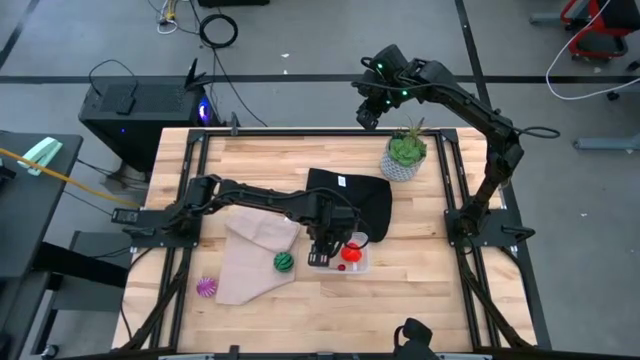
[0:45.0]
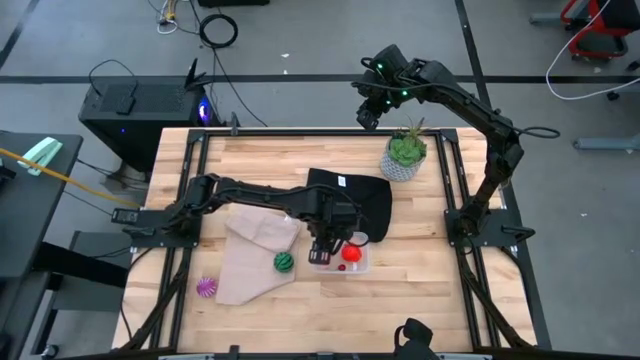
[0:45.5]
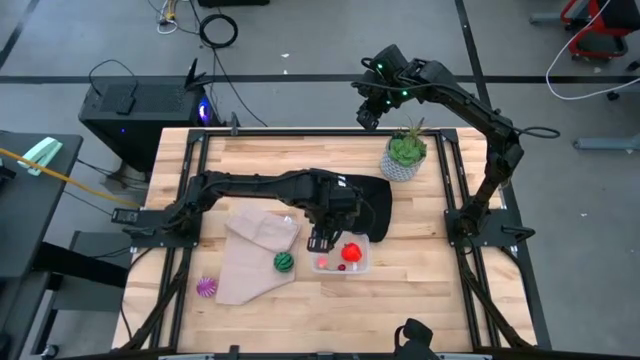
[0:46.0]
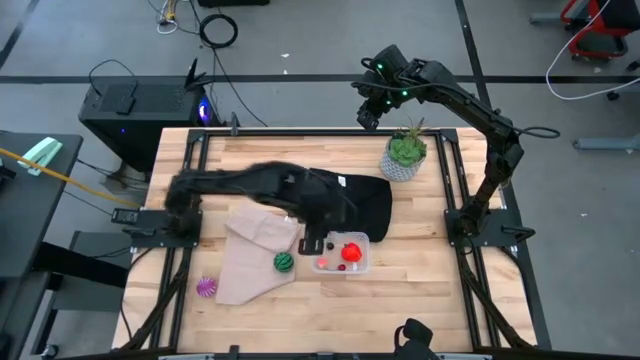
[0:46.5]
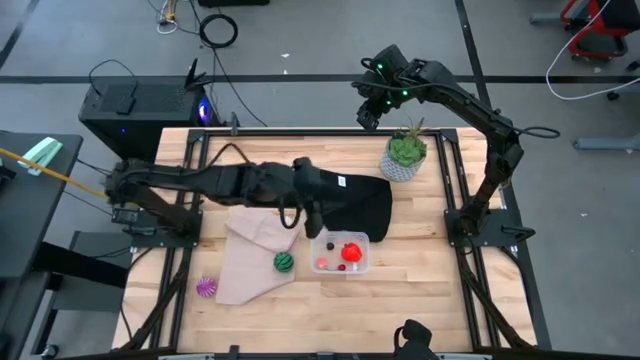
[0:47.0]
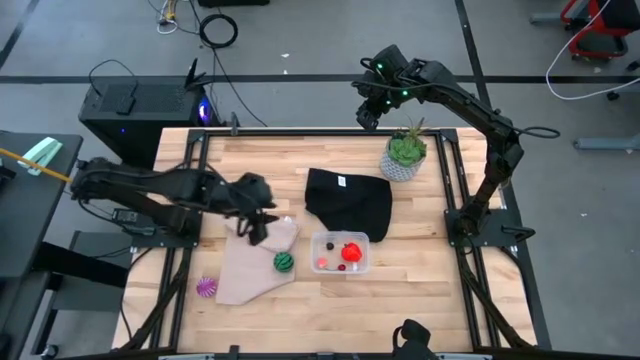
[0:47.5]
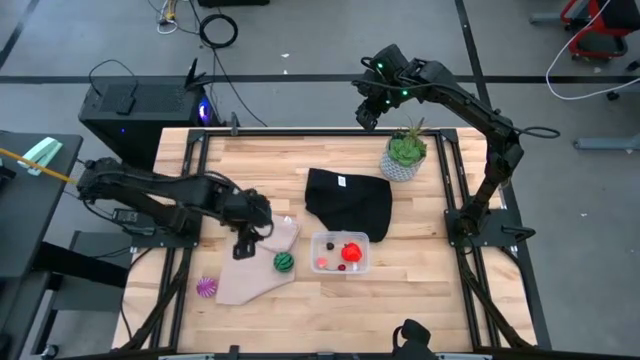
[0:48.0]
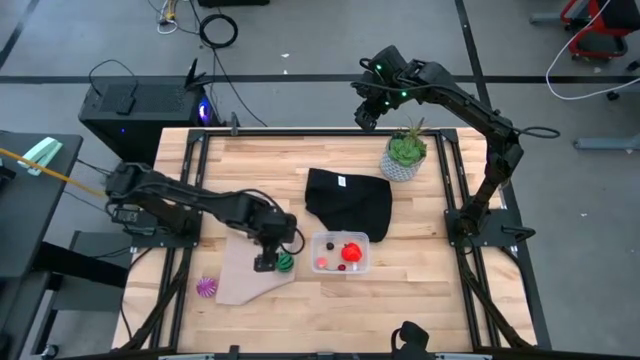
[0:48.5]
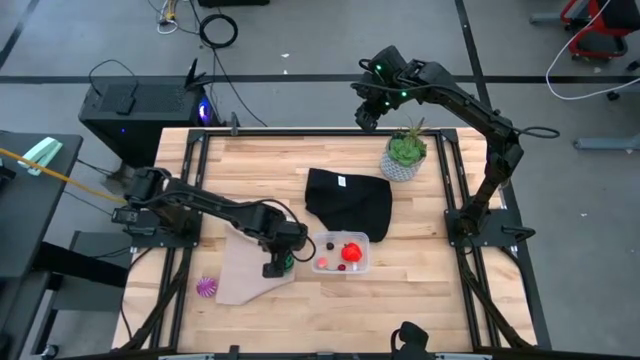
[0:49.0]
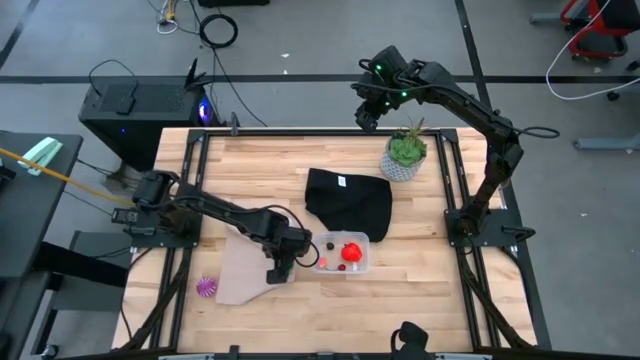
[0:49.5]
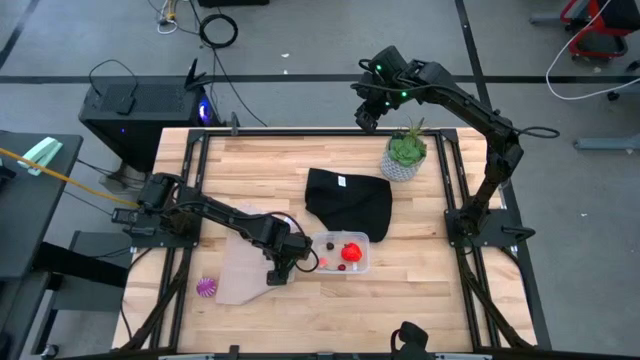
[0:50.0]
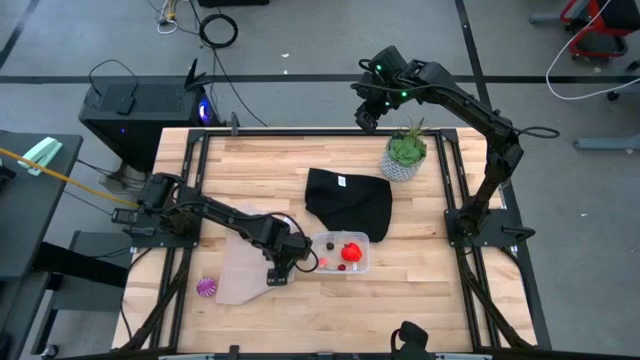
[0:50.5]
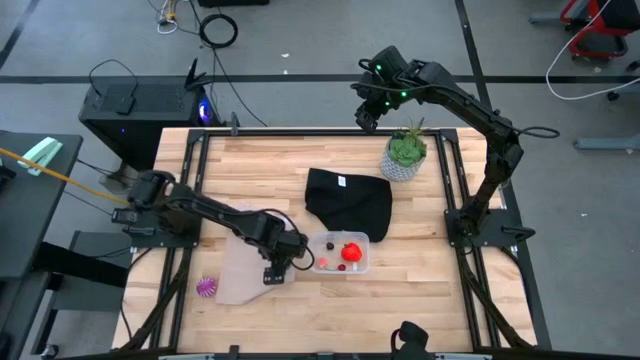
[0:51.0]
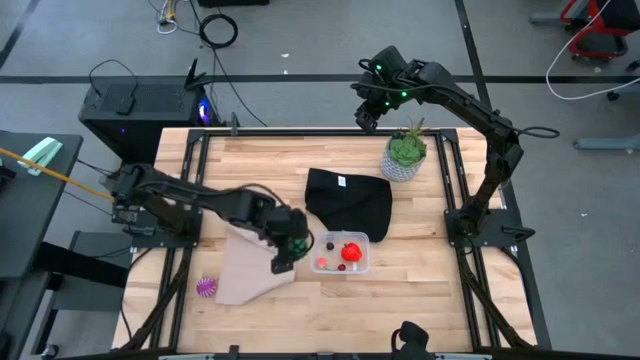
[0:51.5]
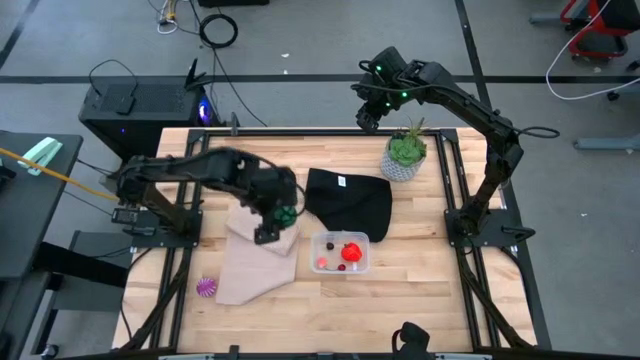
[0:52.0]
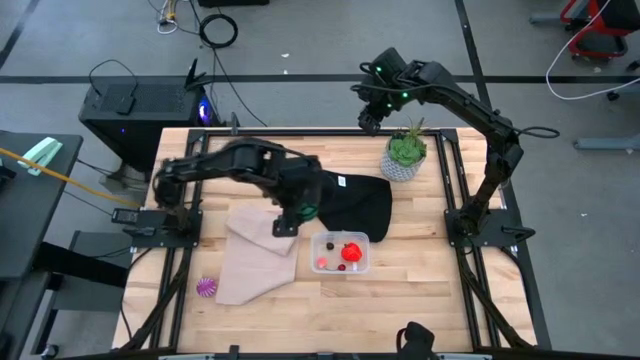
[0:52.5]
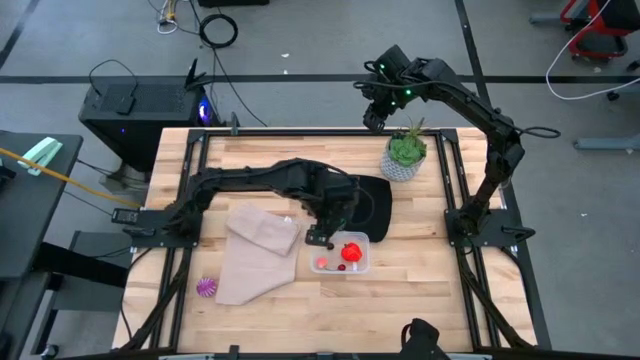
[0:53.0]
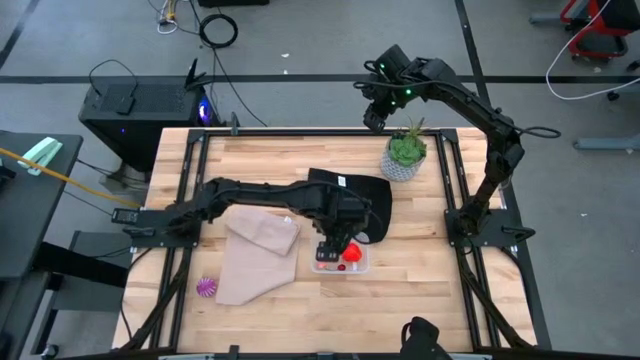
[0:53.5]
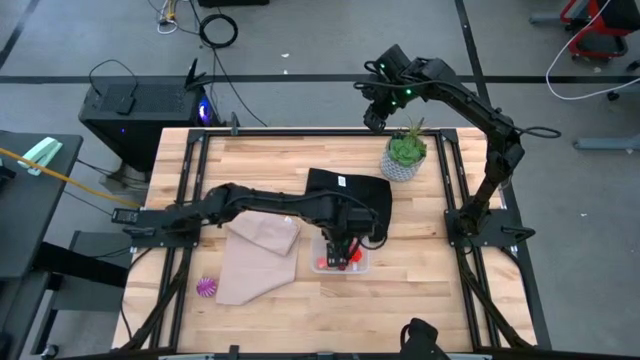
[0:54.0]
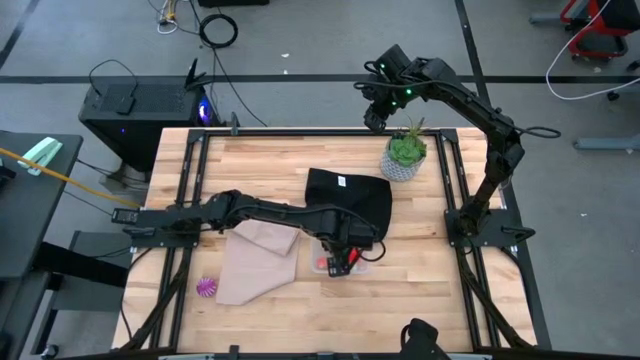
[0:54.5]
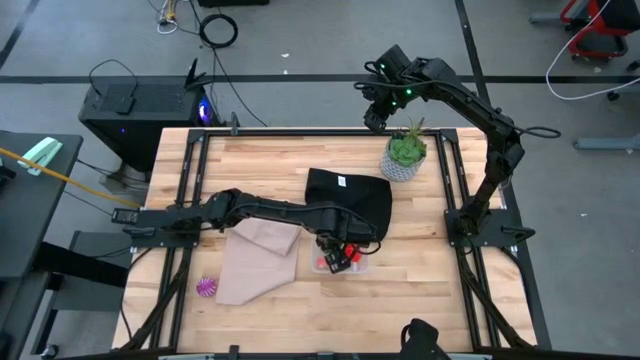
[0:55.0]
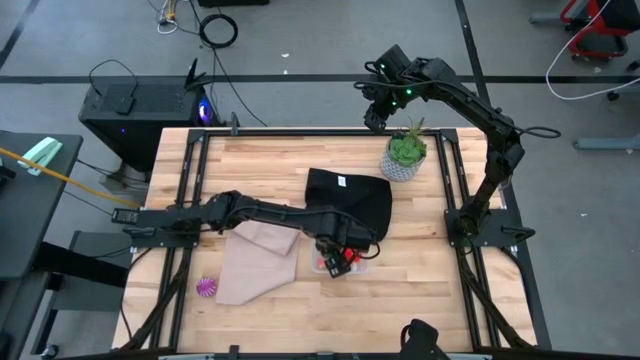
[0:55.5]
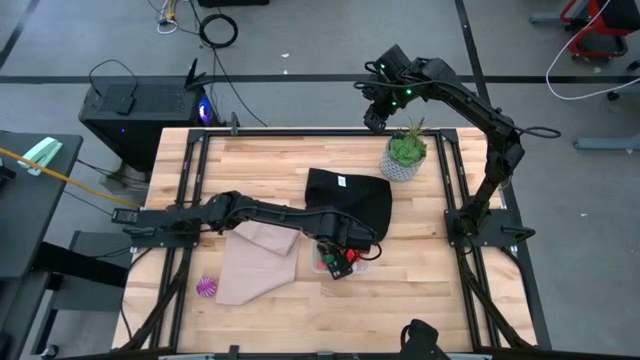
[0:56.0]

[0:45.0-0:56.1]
Task: Pick and placing Produce into tupperware
Put the watermelon into the transparent bin

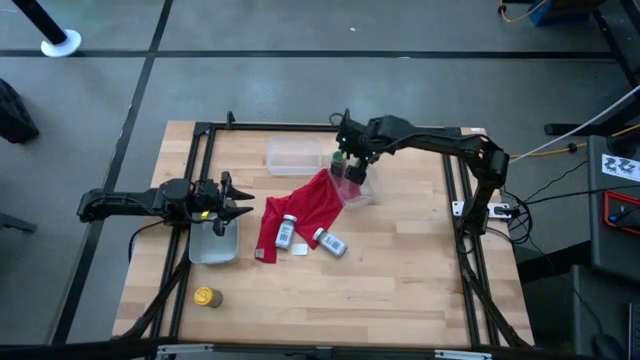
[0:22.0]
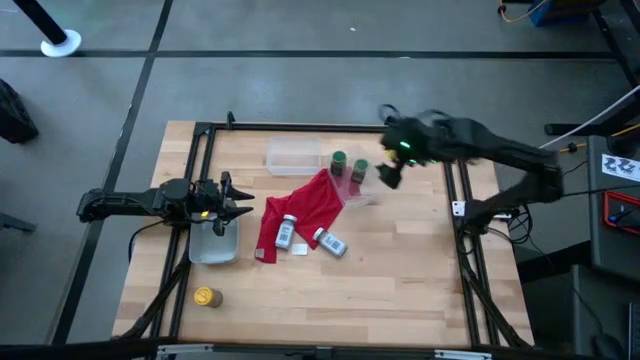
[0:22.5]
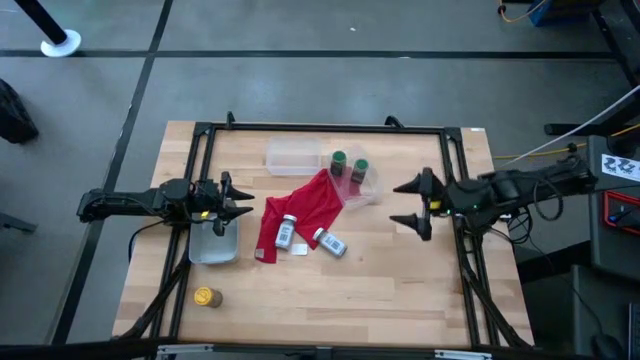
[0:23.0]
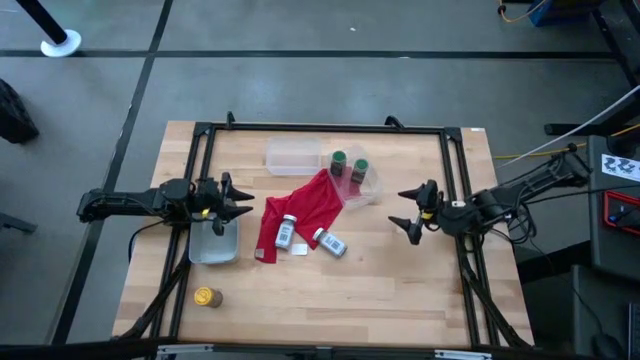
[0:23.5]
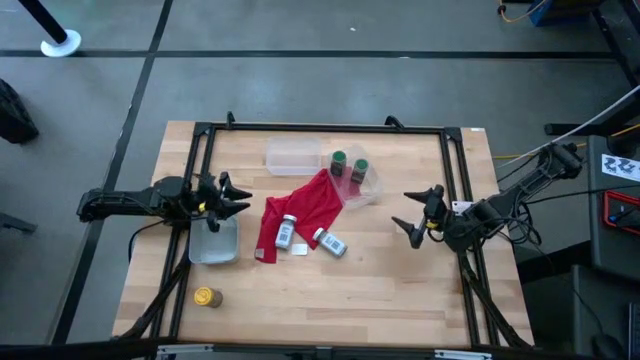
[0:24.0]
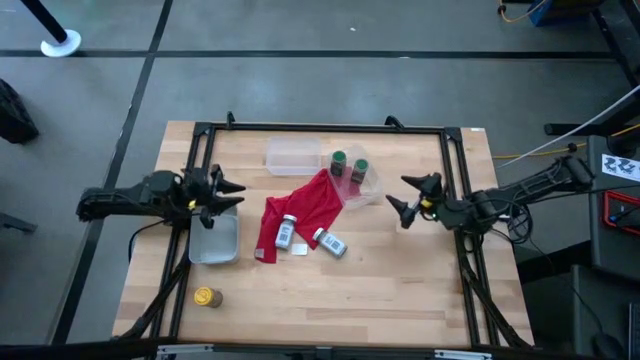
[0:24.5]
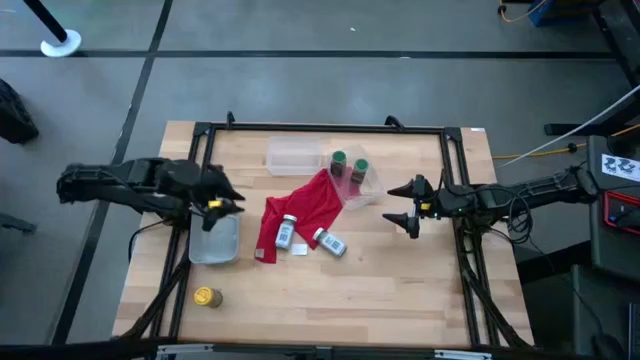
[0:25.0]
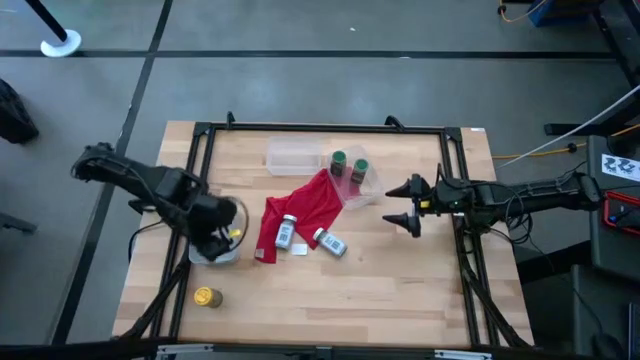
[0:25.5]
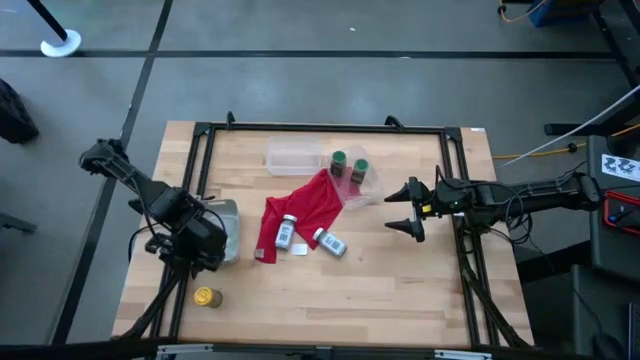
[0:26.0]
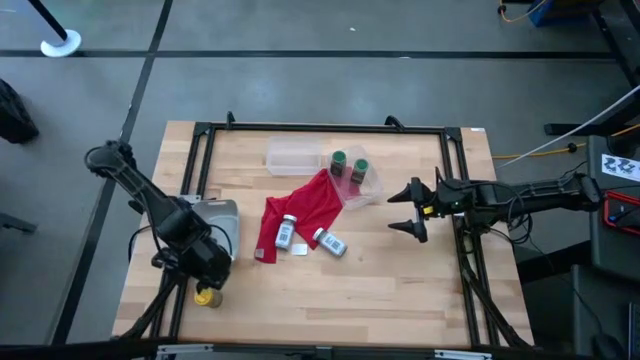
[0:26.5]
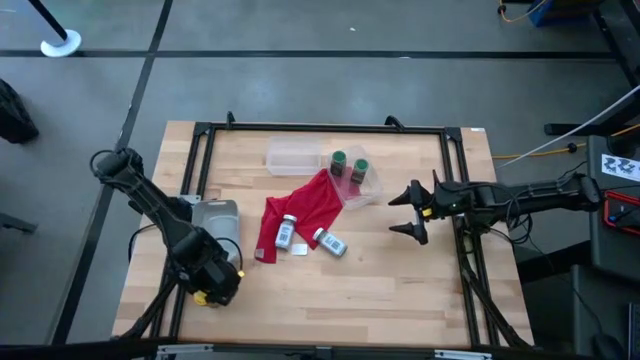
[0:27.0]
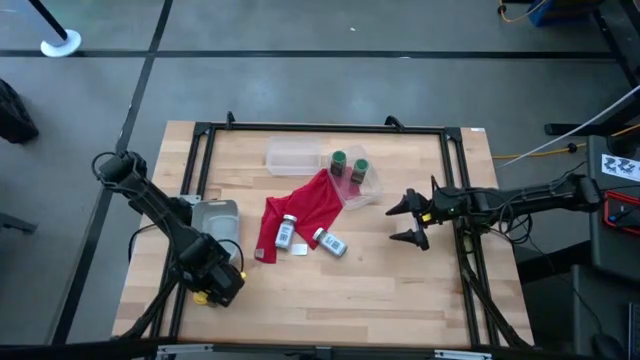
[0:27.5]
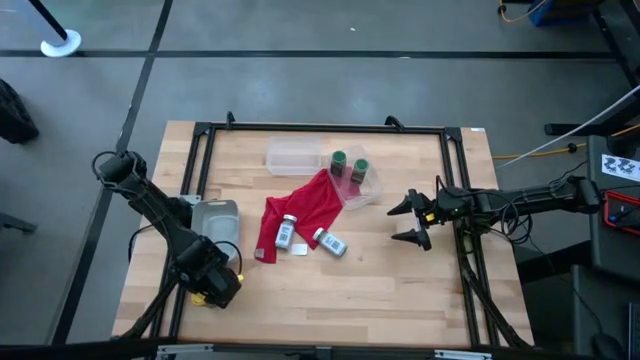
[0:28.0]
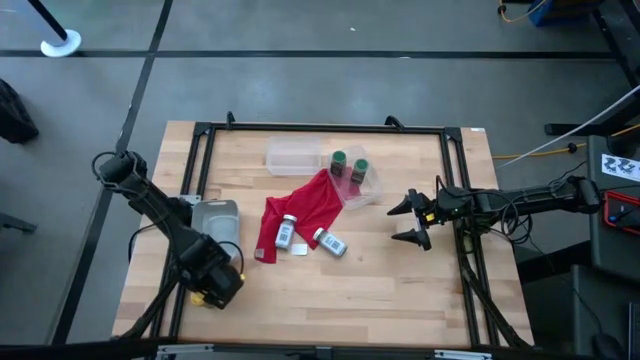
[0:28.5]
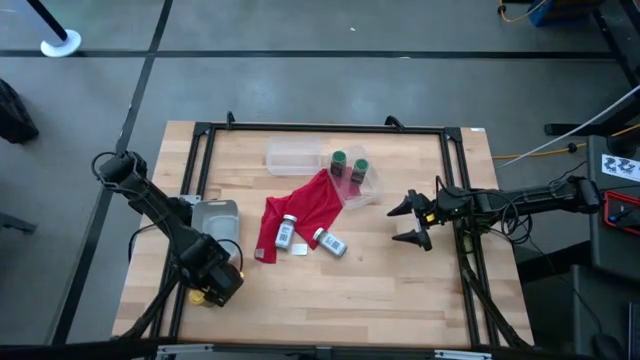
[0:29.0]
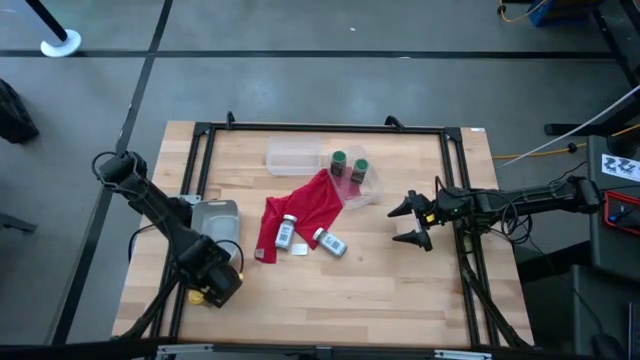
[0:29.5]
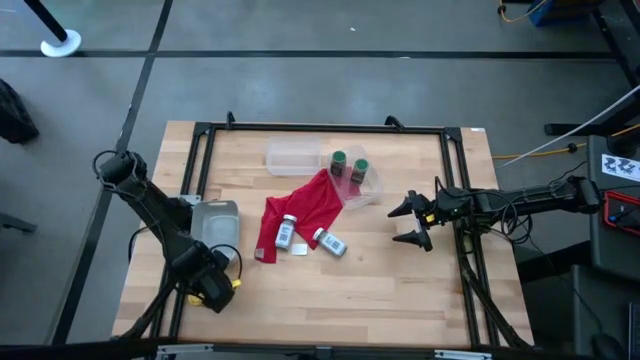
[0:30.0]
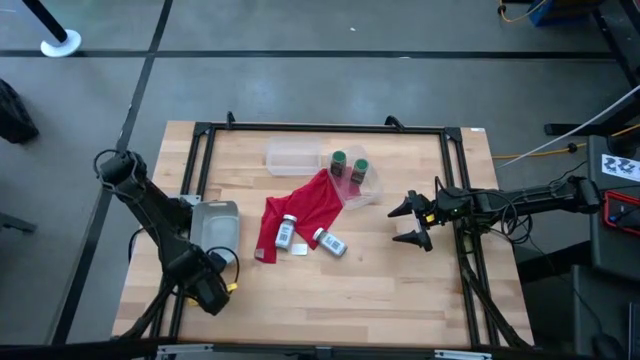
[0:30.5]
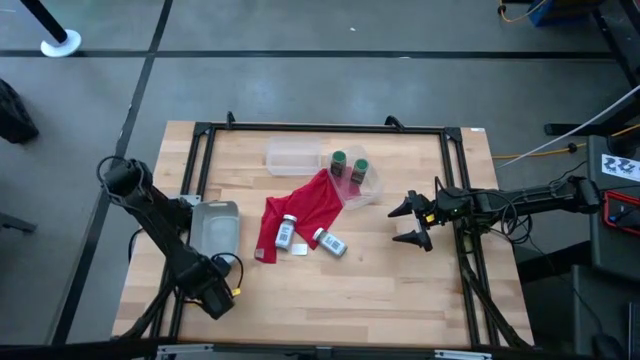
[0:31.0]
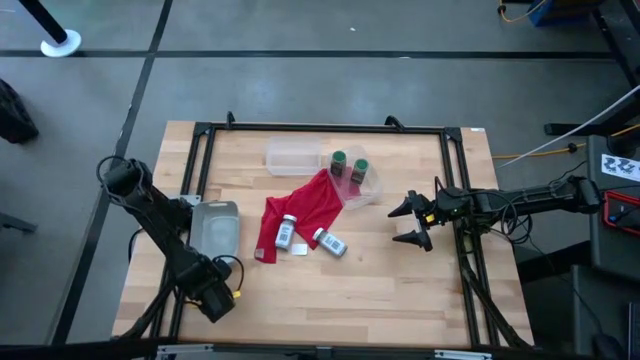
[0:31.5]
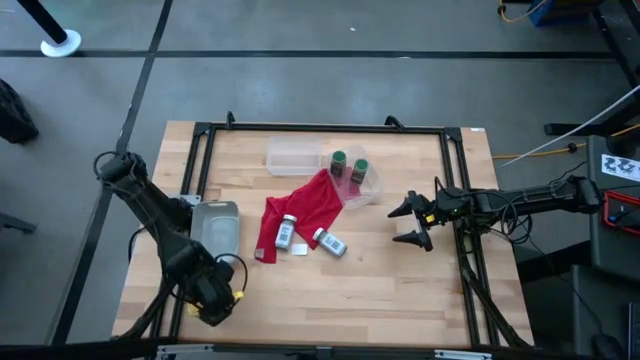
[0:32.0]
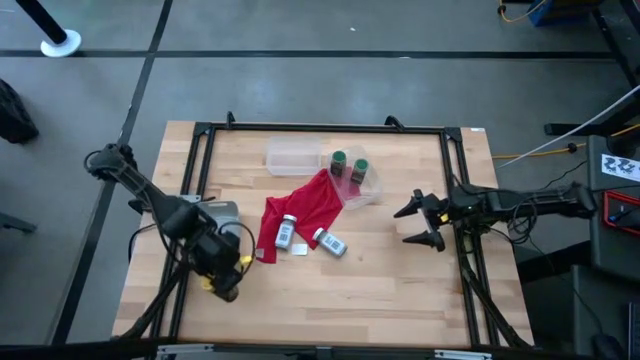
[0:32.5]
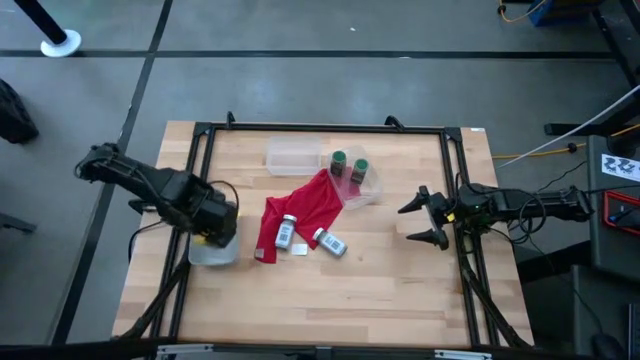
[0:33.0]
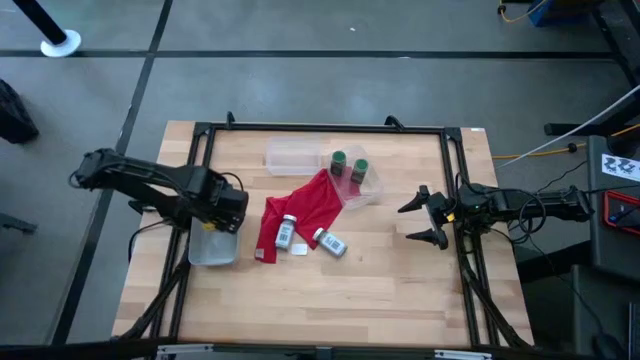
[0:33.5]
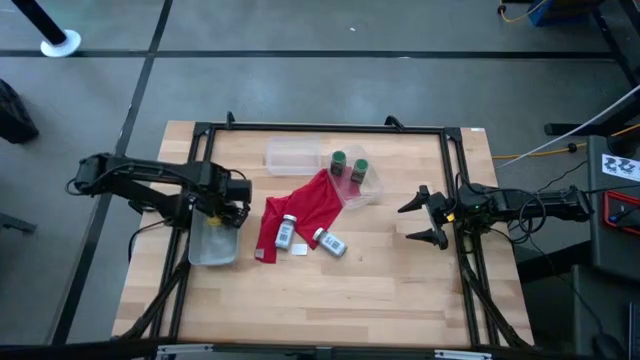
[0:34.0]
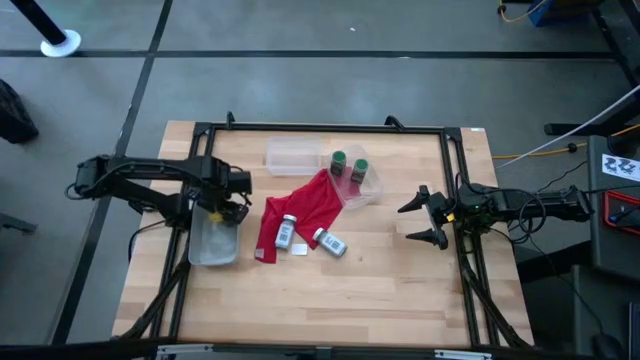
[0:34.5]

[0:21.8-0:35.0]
Task: Sort spices by type
Put the yellow seasoning can into the gray bin
